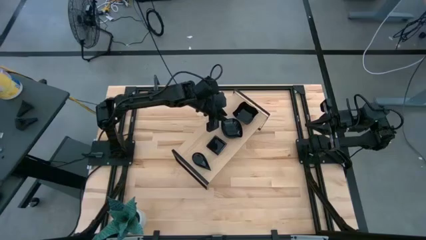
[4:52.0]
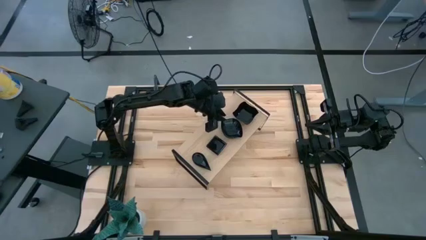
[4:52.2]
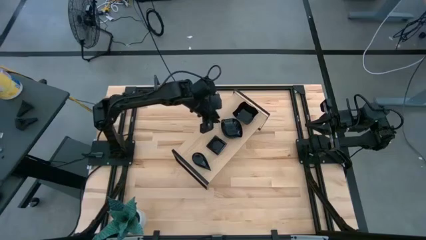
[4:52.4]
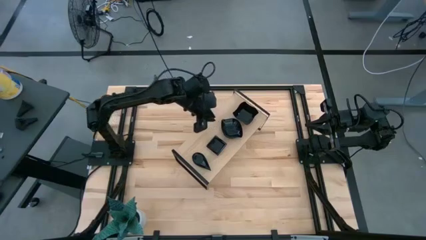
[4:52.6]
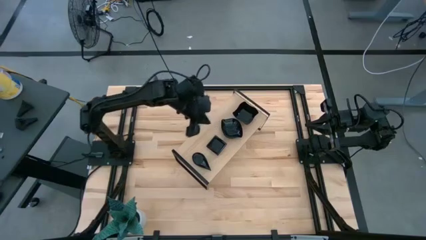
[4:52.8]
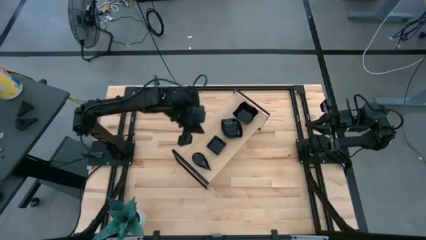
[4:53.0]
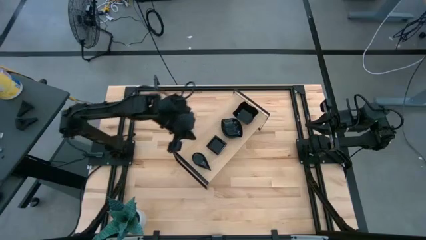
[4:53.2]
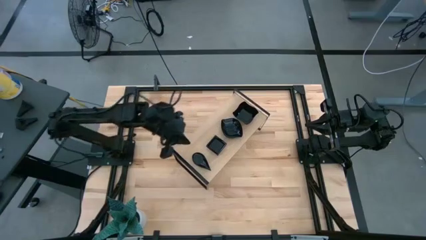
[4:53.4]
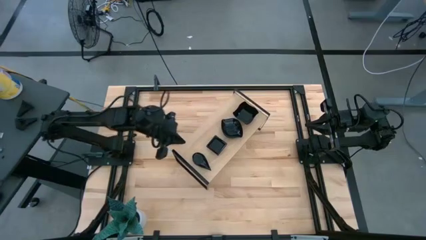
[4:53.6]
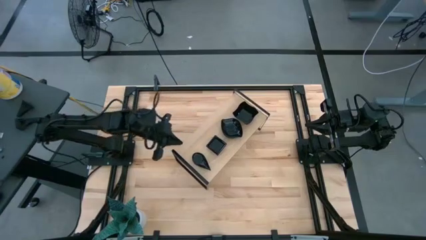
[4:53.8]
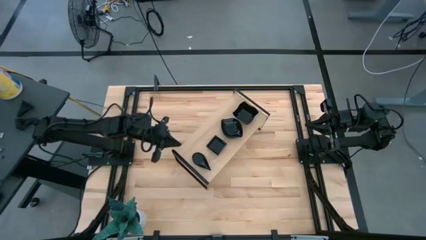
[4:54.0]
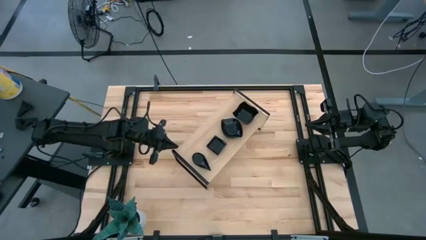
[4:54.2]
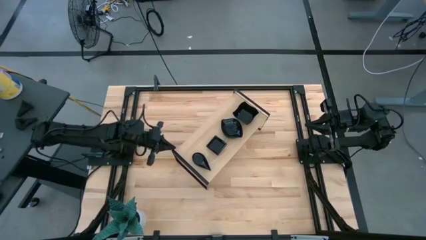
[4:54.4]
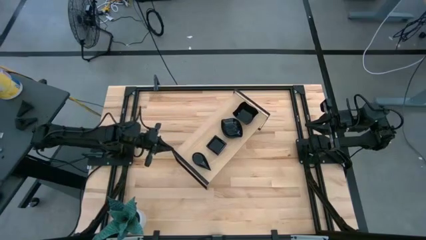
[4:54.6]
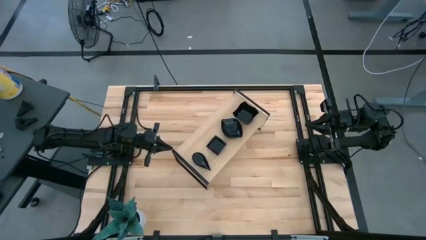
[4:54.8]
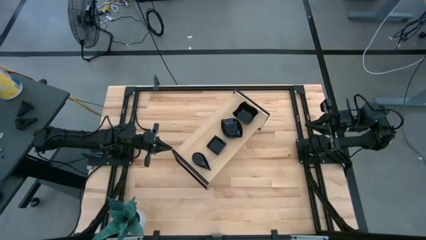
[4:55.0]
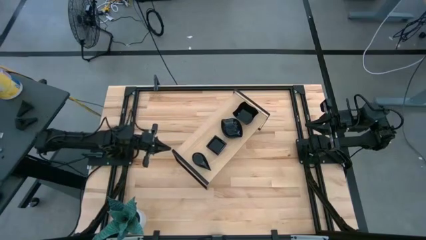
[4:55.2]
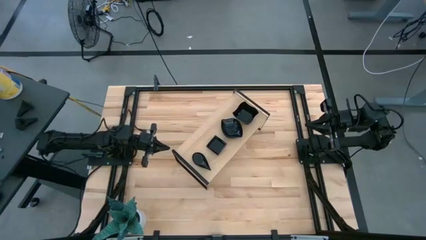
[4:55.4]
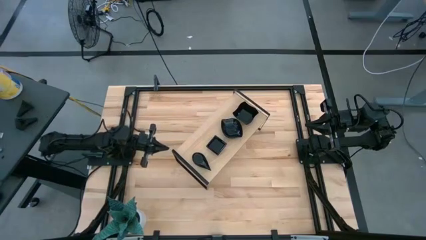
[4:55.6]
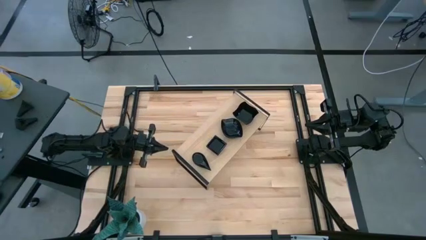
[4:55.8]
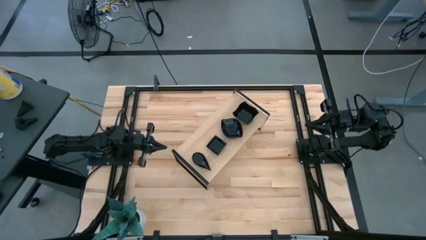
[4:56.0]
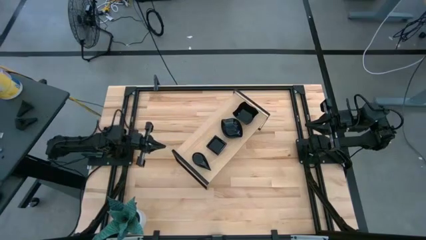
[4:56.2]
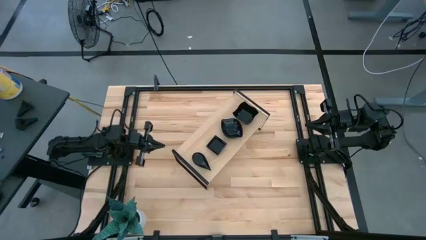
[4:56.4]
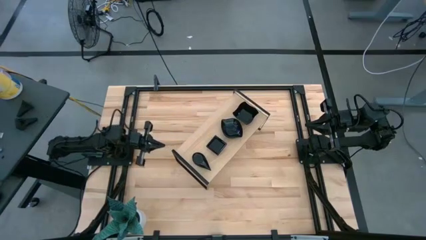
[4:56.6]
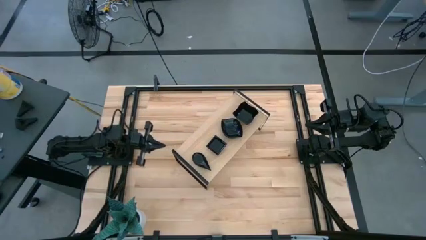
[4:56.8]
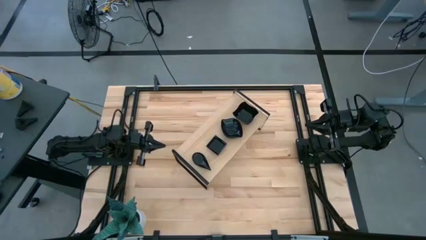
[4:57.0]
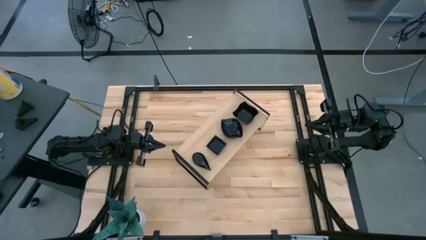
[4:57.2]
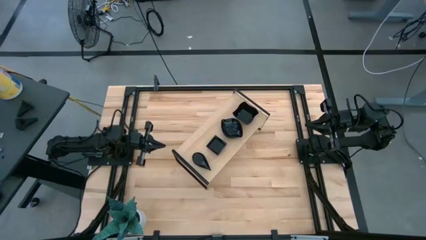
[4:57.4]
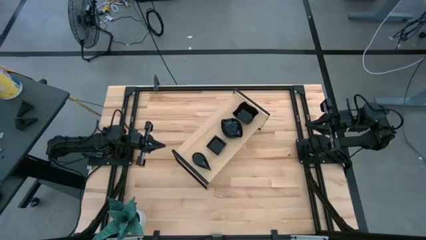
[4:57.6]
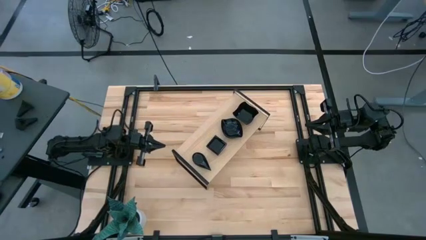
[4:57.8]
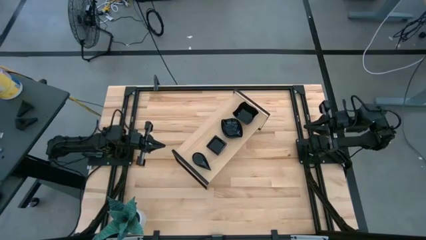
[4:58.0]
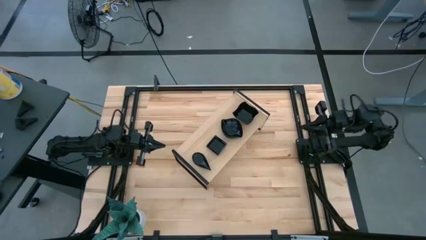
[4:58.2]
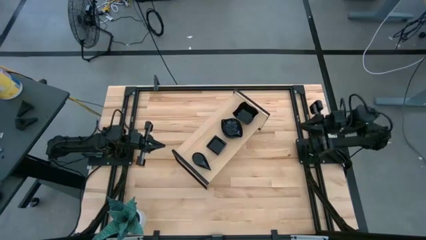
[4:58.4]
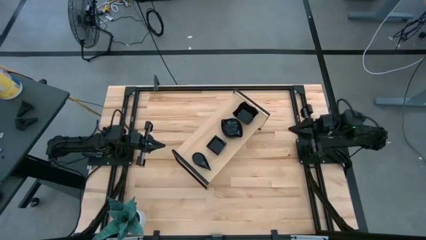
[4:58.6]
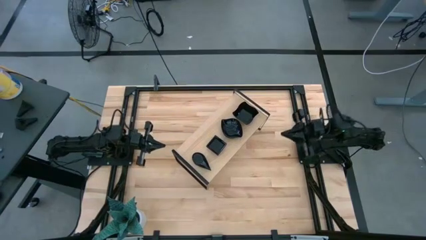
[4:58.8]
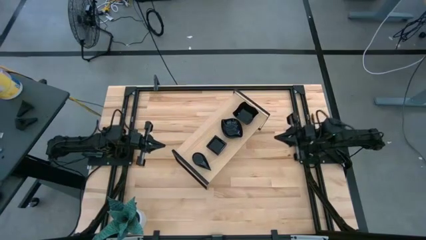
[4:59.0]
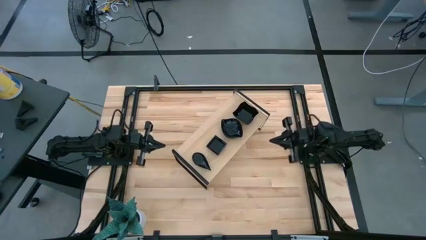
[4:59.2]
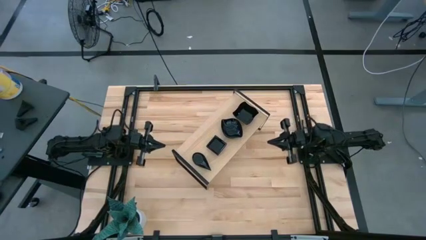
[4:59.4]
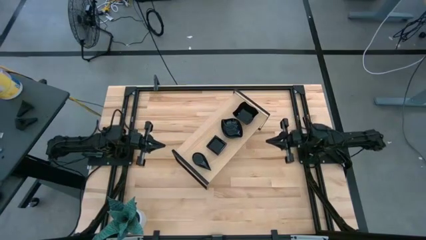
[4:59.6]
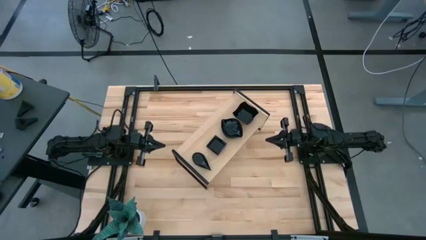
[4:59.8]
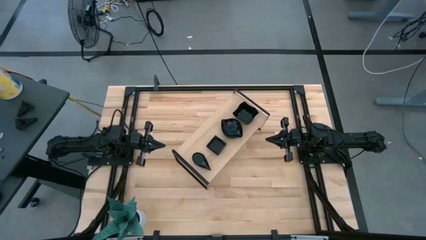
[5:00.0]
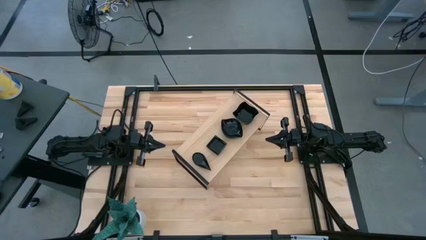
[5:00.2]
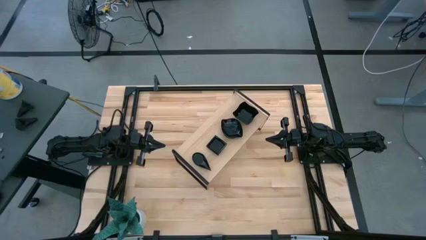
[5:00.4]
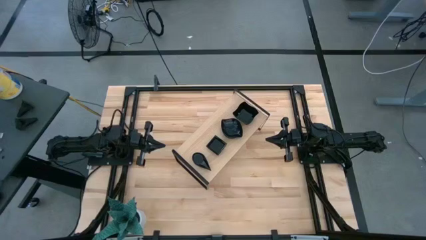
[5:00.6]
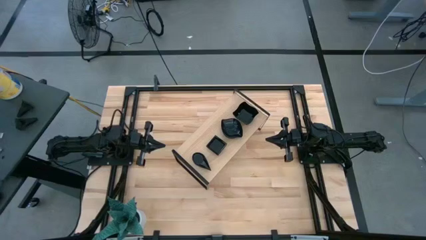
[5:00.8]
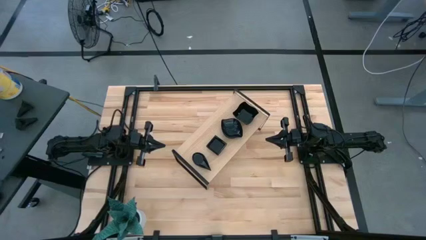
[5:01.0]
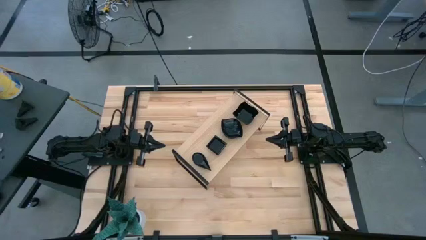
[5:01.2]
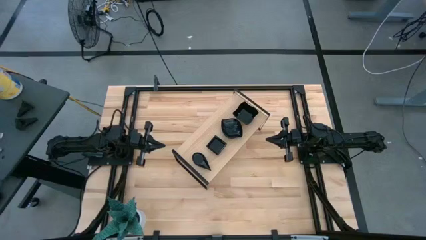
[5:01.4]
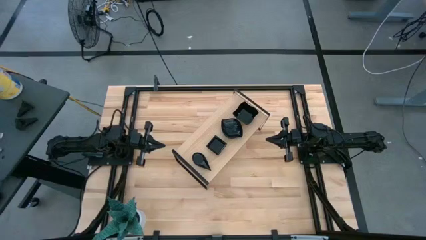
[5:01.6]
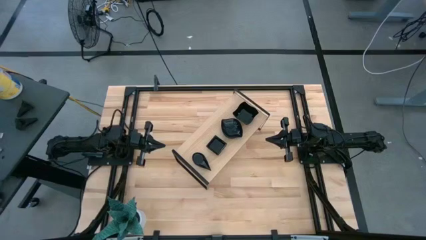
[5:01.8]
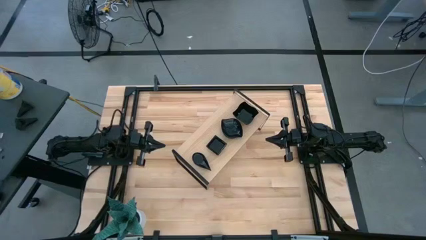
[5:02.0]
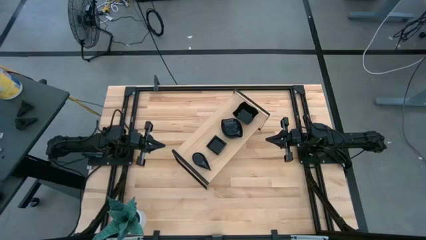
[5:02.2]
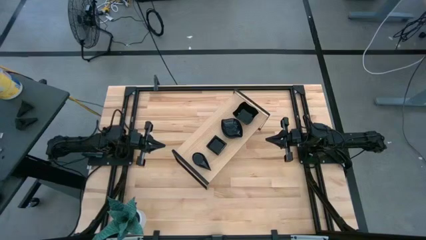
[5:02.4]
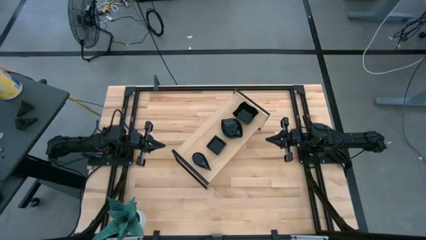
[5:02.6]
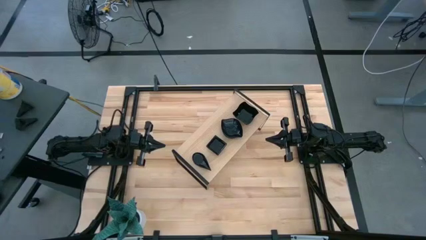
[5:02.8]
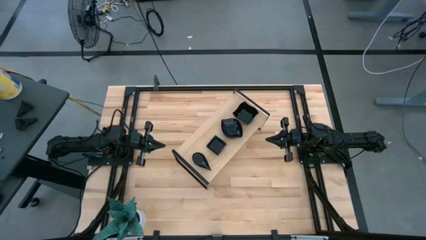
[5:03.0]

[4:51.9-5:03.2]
Task: Pick & Place Mini shaped plates
Return to Home Position

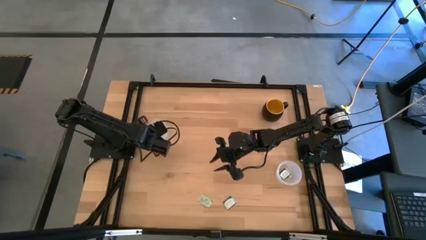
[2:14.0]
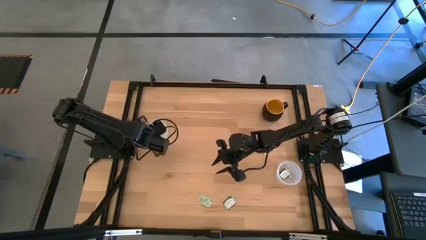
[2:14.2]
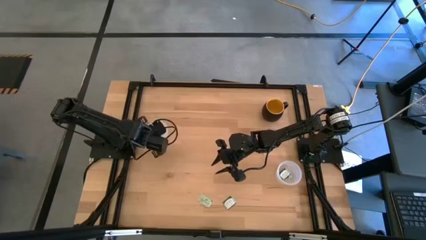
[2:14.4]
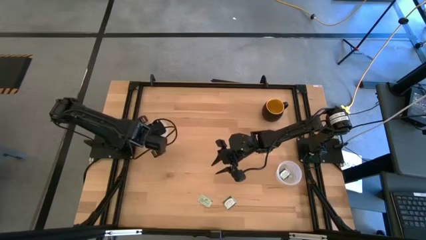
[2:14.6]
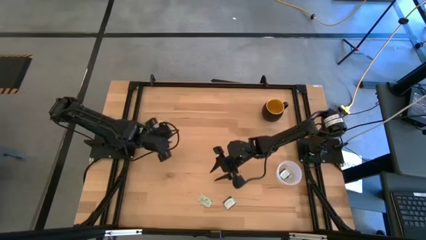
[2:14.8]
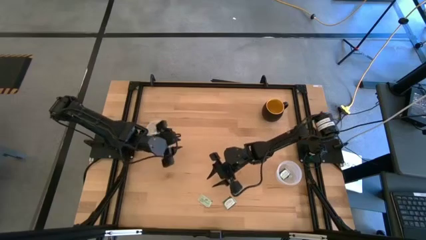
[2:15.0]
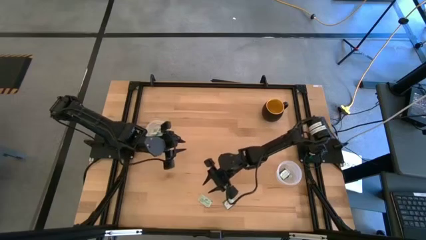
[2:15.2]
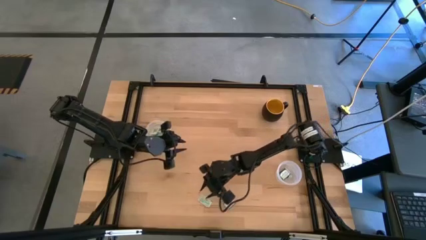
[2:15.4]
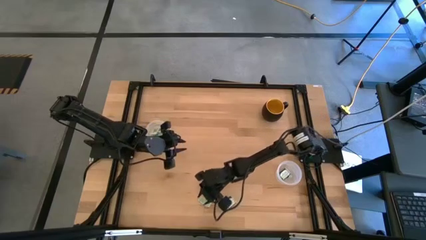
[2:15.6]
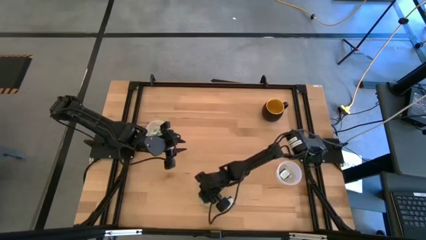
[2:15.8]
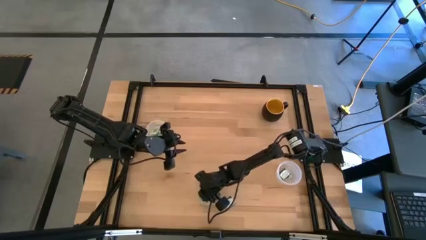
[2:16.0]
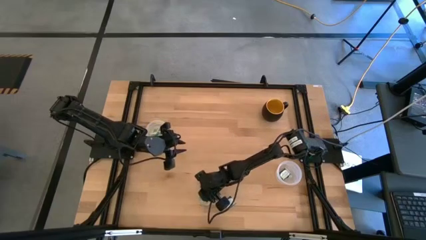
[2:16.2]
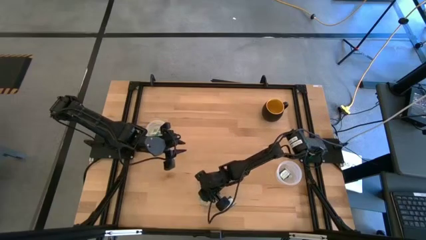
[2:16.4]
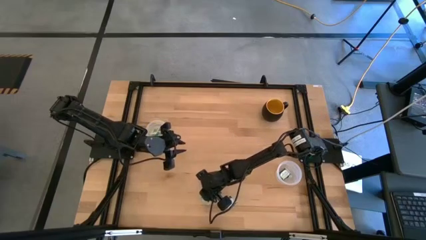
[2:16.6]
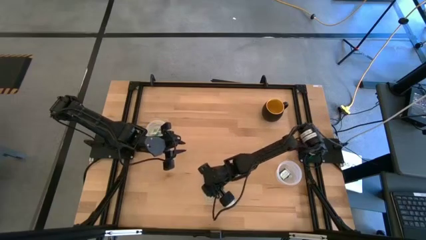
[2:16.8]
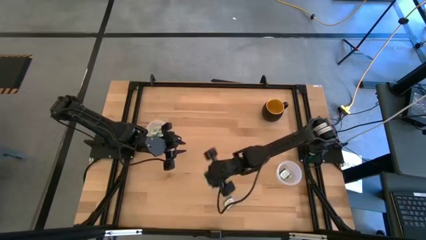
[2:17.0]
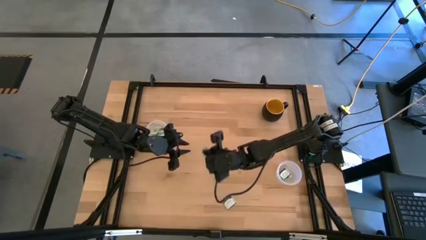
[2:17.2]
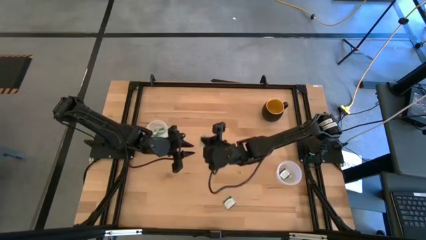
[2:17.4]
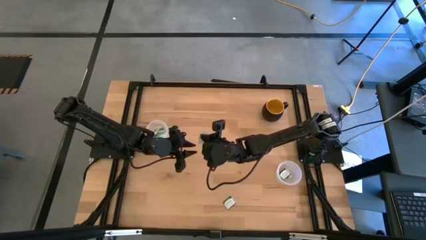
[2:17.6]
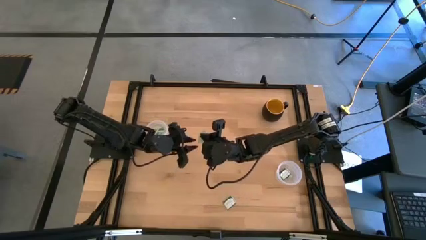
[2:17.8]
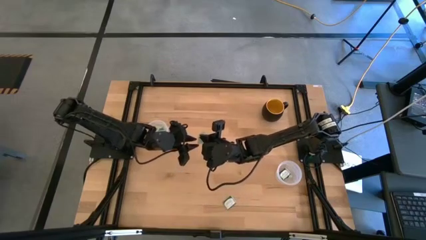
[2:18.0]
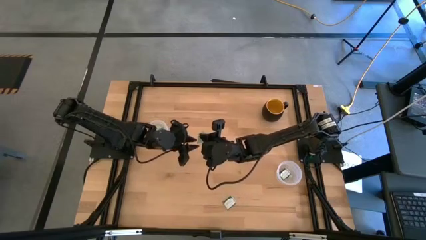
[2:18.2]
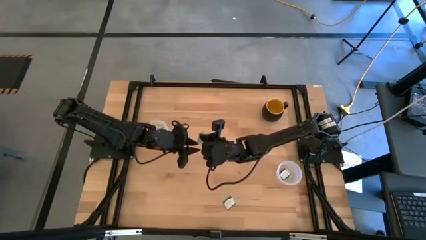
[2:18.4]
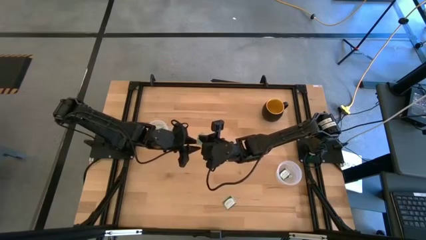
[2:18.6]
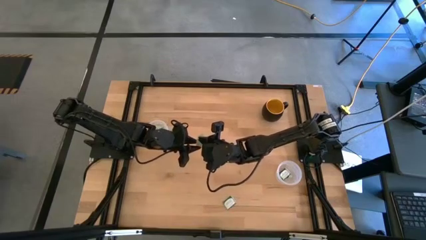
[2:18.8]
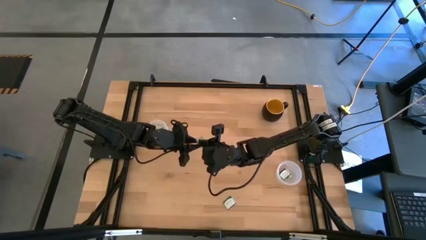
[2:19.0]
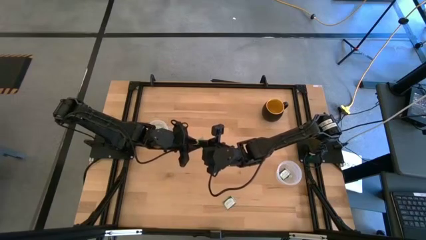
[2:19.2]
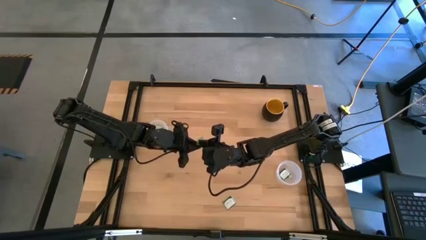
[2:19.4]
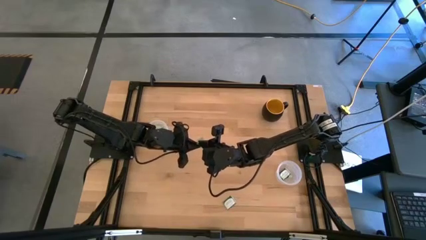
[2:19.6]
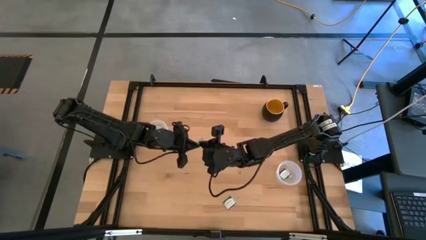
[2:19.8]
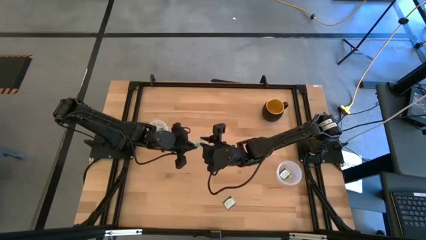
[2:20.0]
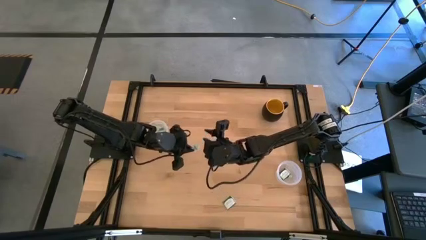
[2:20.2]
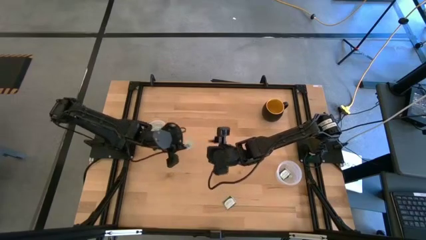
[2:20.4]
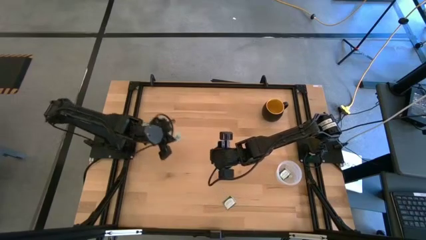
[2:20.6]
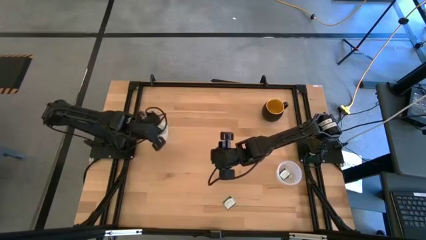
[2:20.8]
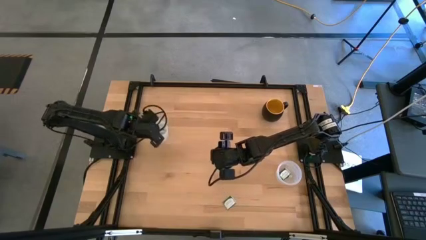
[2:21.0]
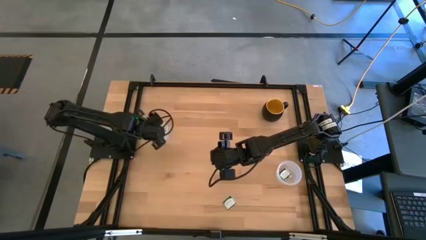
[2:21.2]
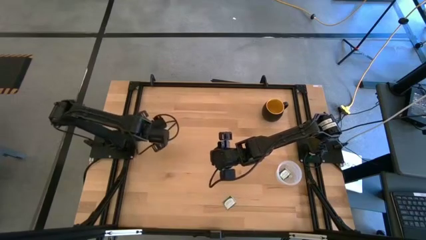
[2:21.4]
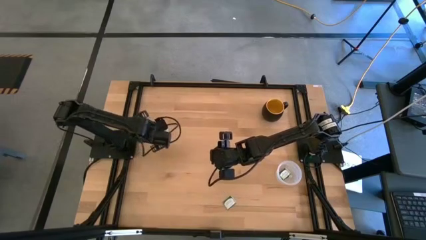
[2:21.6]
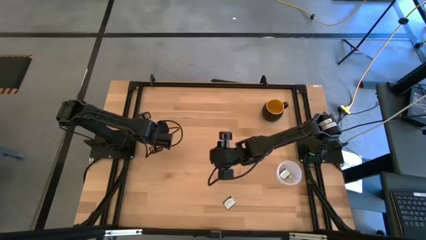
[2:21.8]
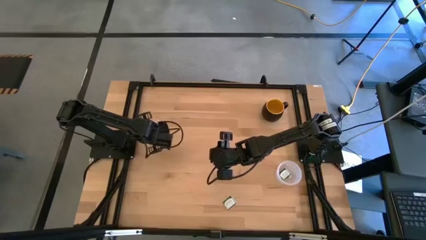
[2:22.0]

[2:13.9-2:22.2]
Task: Pick and place Stevia / Truvia into bins
Put the white stevia packet into the left transparent container
